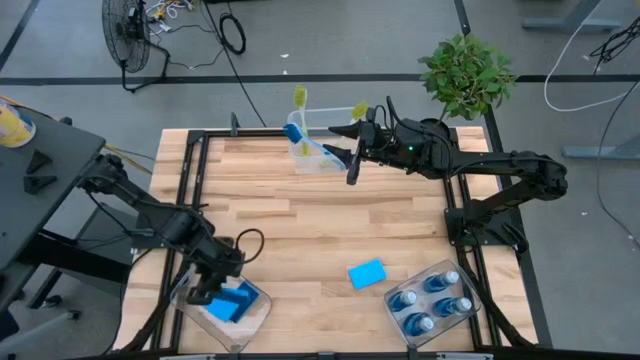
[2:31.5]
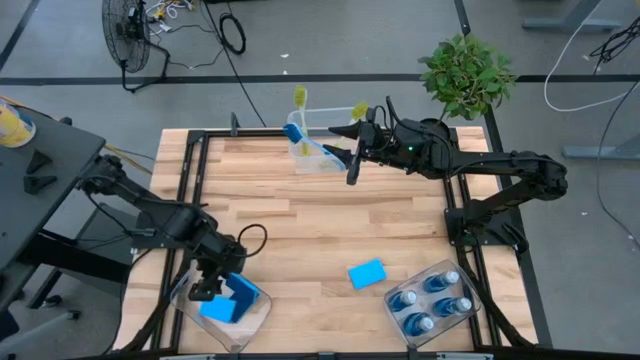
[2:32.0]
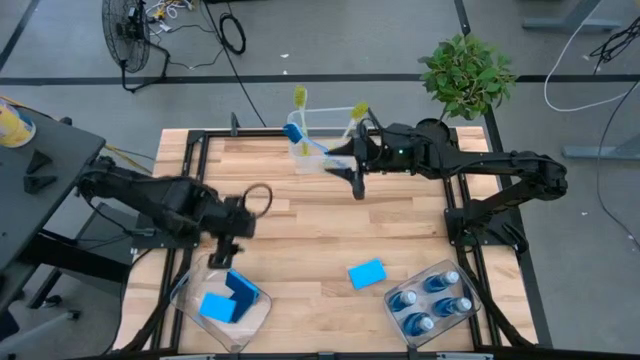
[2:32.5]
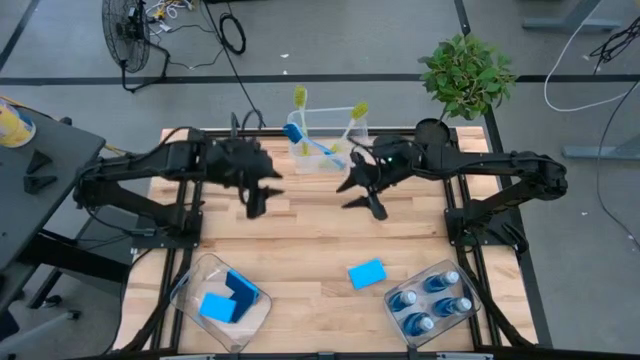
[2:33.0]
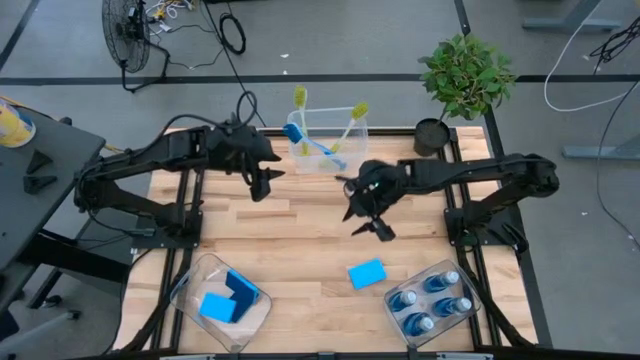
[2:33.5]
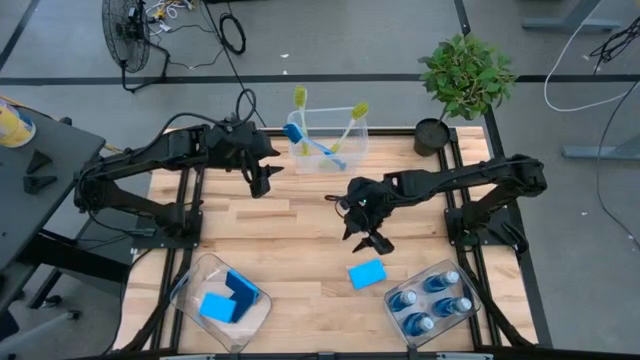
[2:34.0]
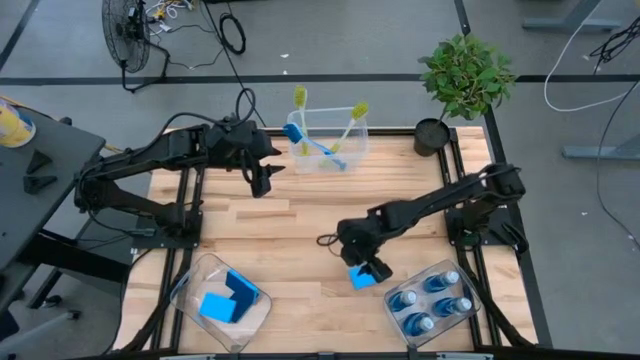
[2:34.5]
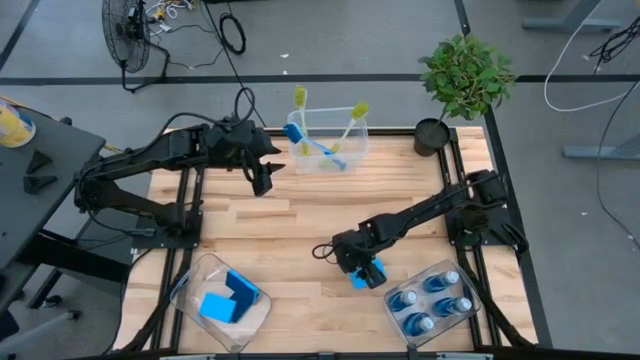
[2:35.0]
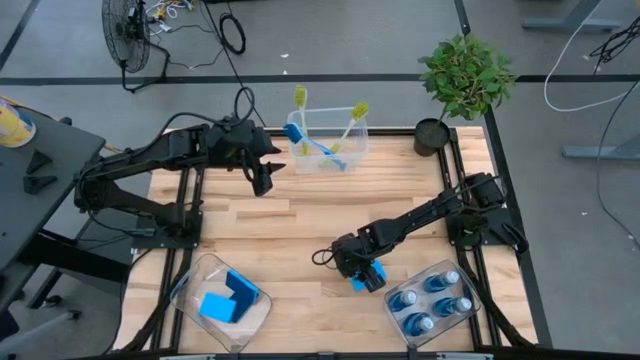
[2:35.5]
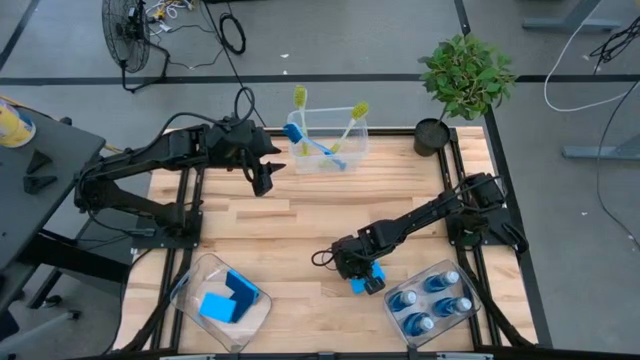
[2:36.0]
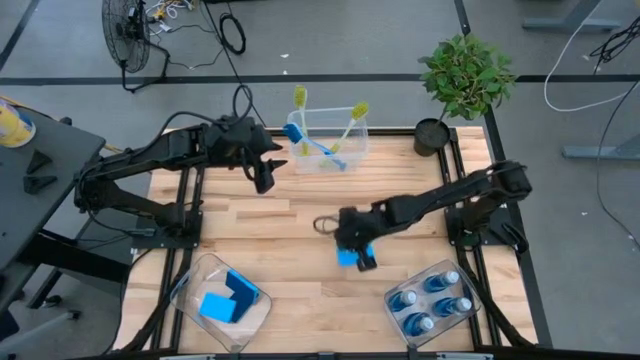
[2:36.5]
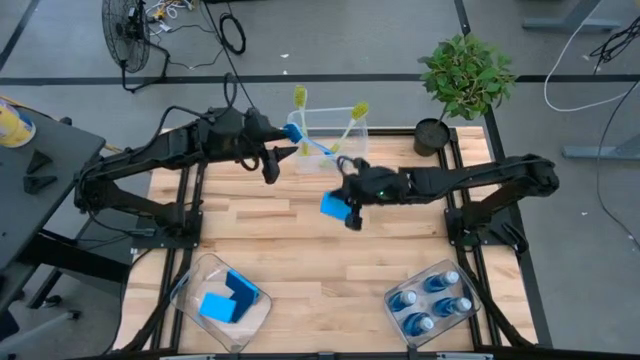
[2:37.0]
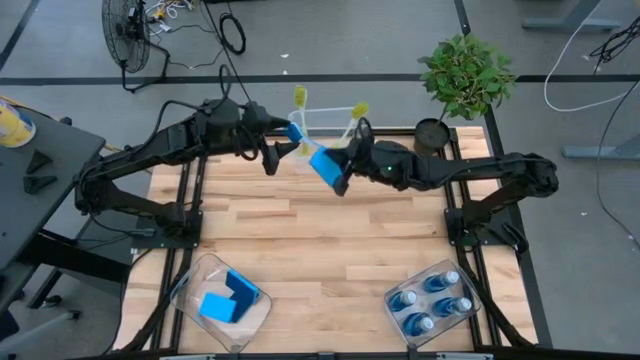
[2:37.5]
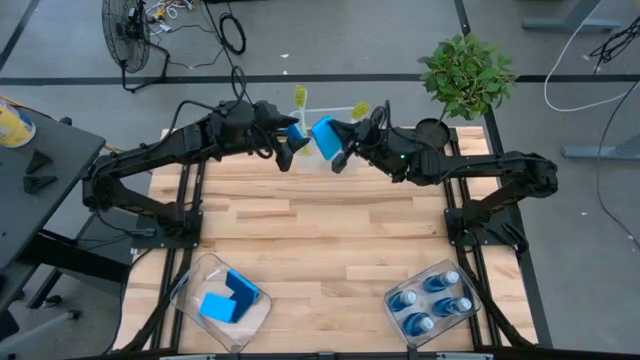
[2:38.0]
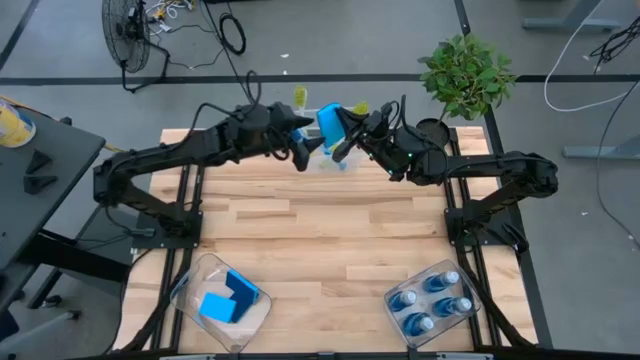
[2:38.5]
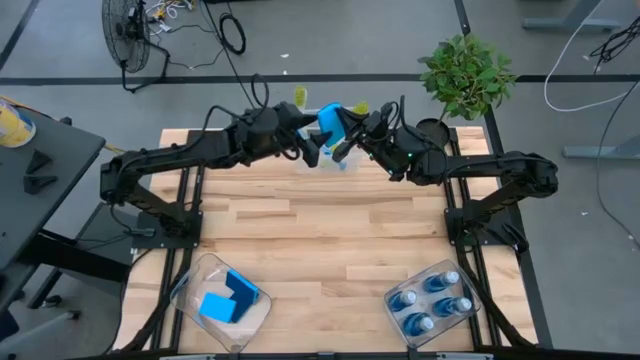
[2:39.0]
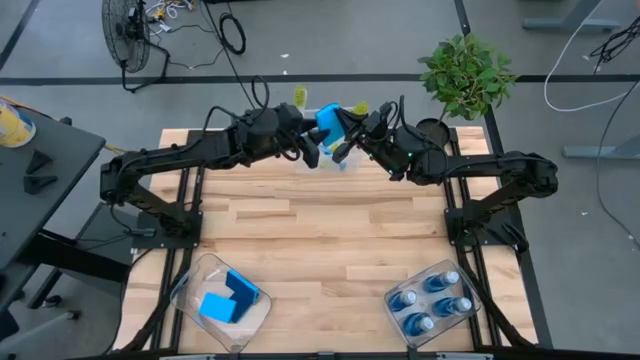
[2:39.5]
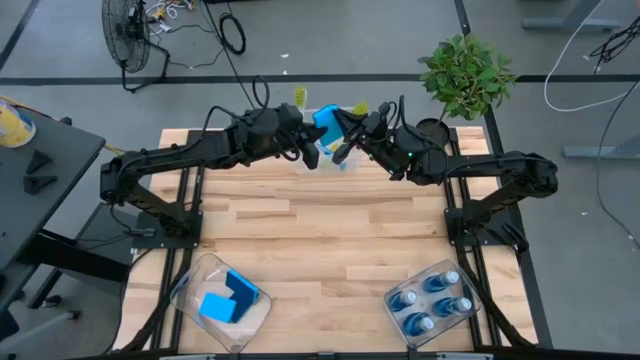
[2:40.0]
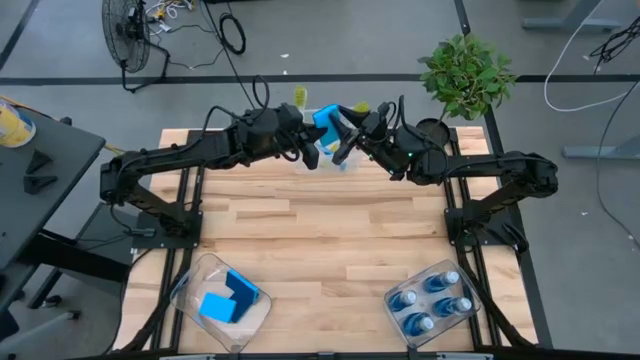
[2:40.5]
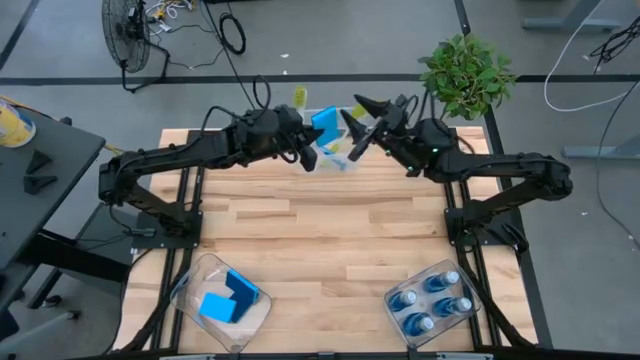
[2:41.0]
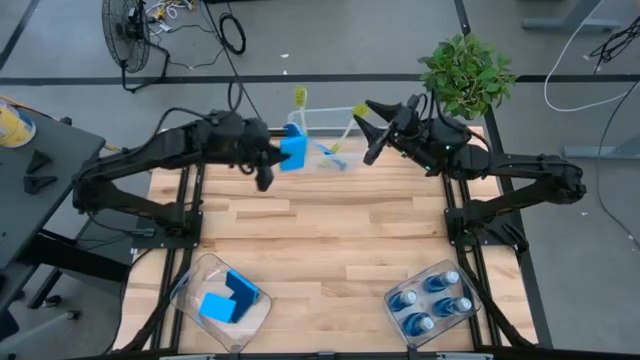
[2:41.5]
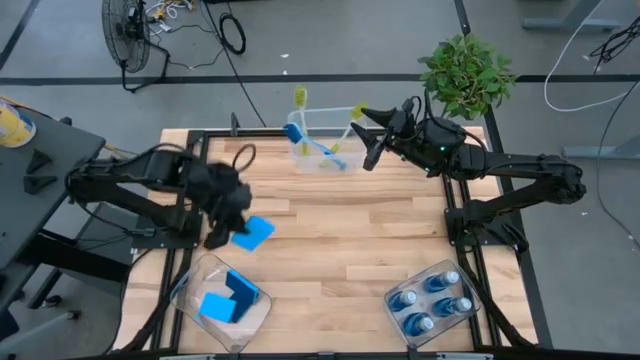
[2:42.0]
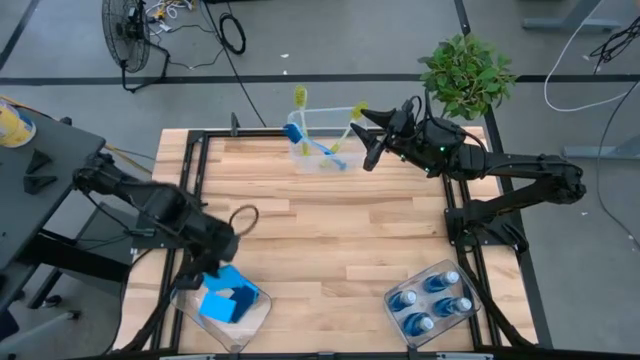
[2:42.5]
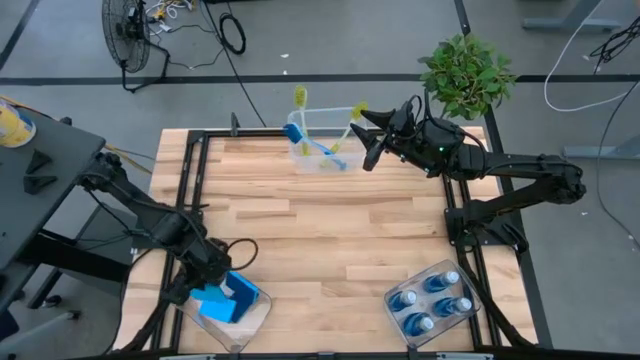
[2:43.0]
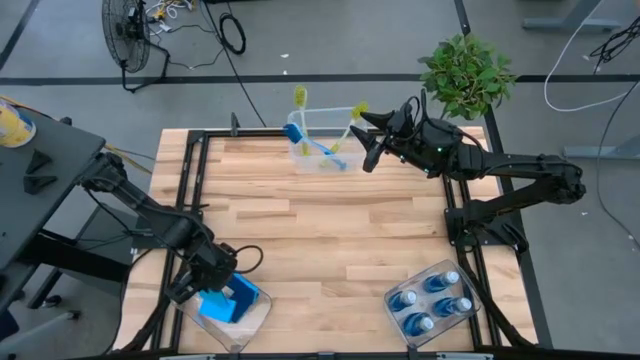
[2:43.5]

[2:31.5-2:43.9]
Task: Pick & Place Kitchen Sink Supplies
Put the blue sponge into the bottom left transparent bin

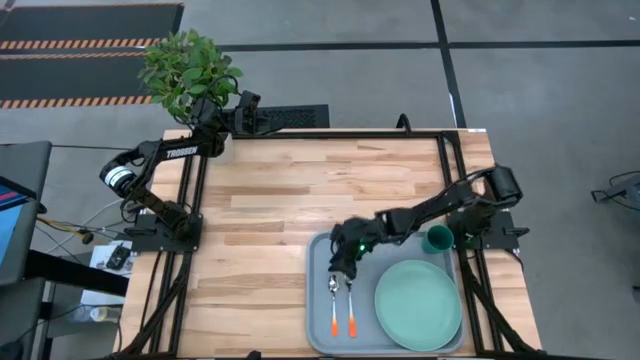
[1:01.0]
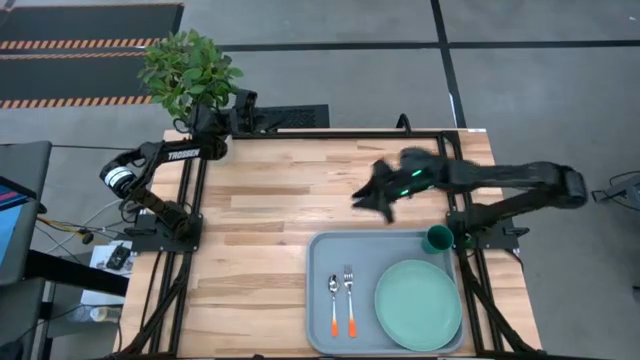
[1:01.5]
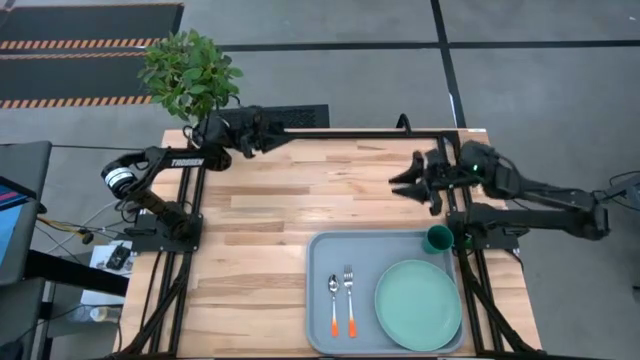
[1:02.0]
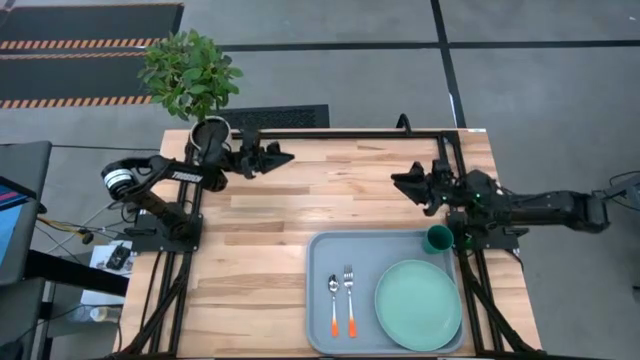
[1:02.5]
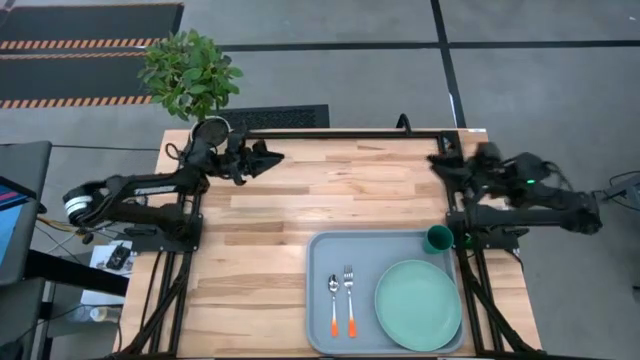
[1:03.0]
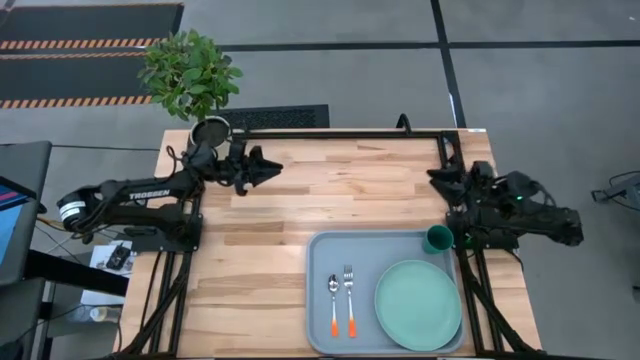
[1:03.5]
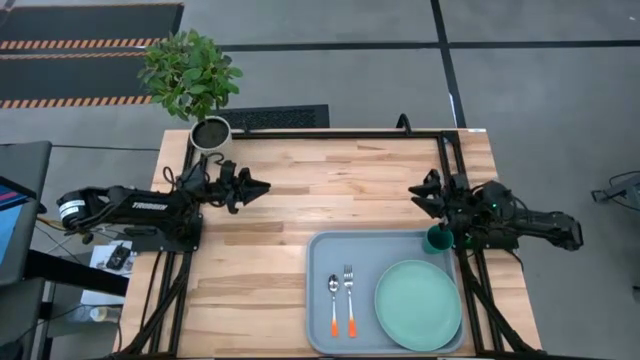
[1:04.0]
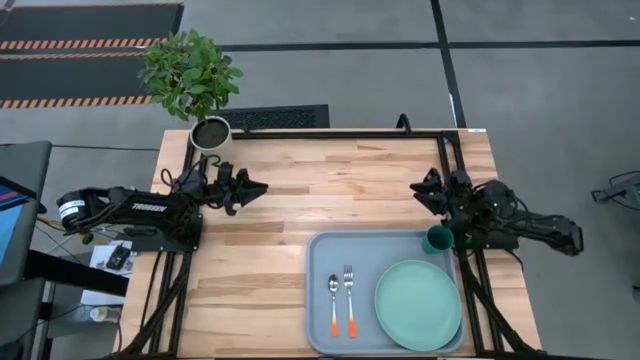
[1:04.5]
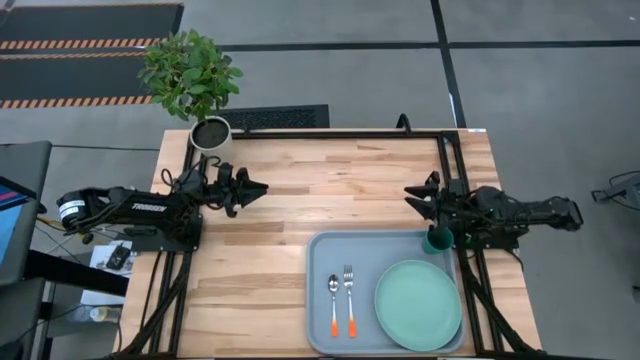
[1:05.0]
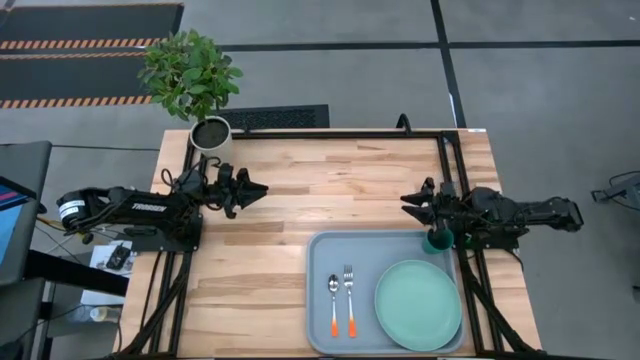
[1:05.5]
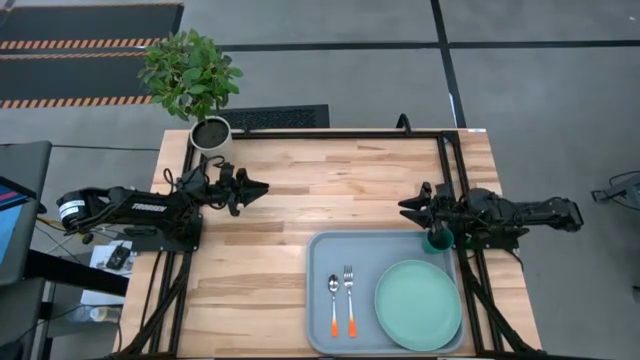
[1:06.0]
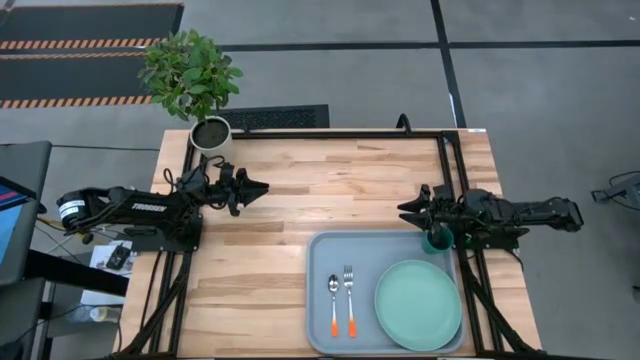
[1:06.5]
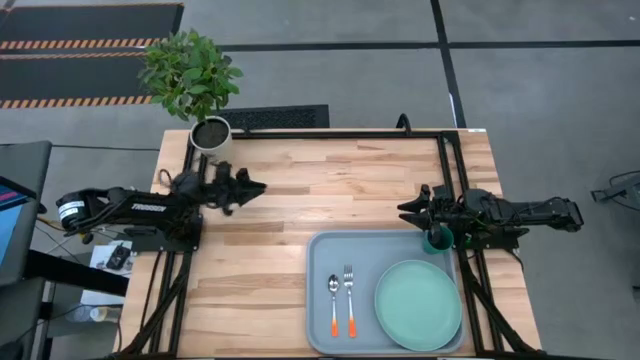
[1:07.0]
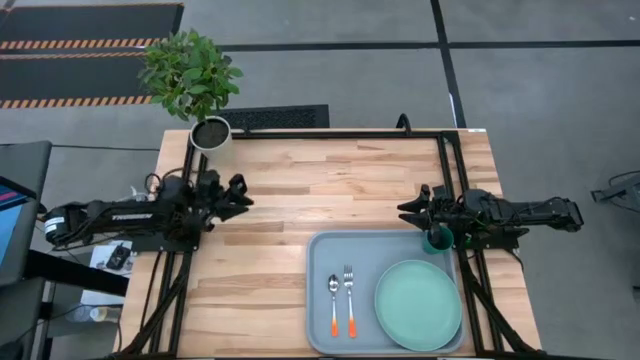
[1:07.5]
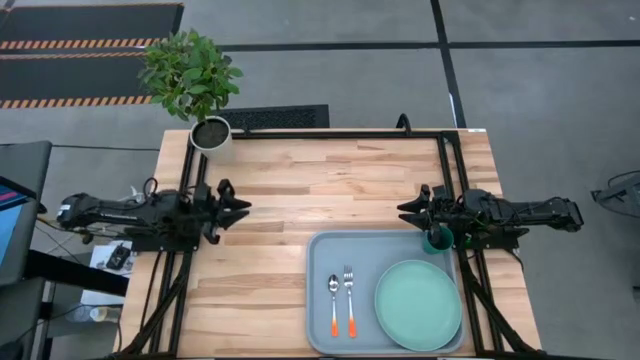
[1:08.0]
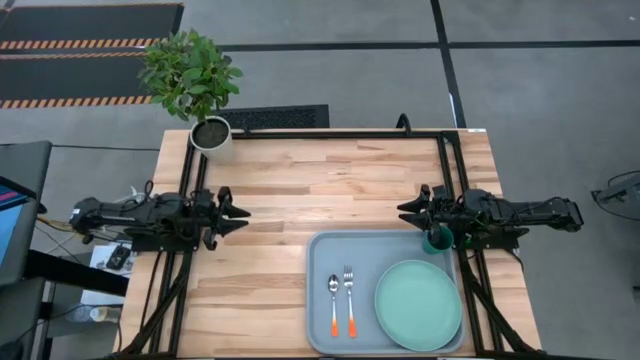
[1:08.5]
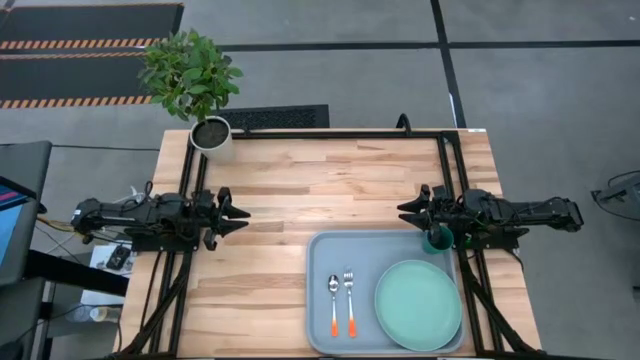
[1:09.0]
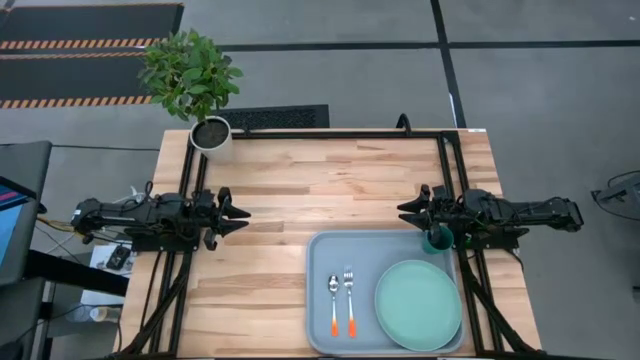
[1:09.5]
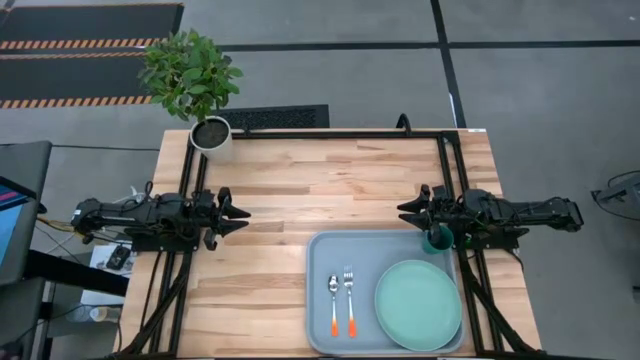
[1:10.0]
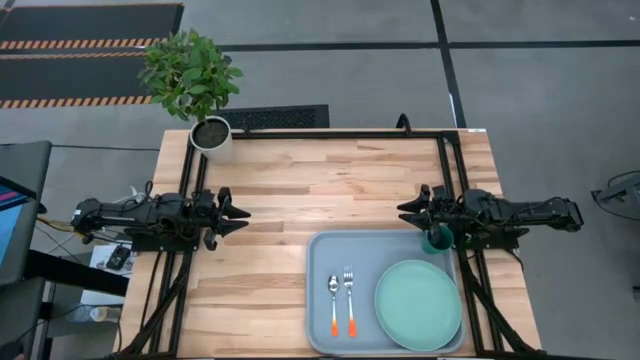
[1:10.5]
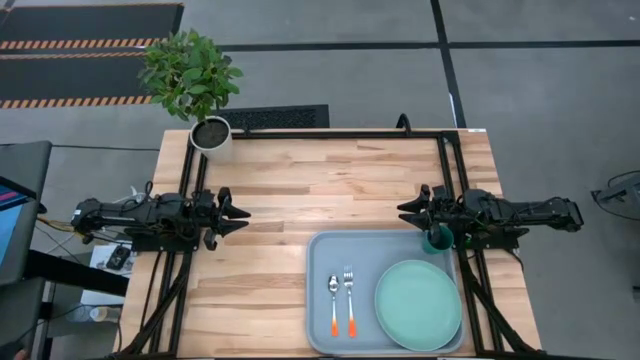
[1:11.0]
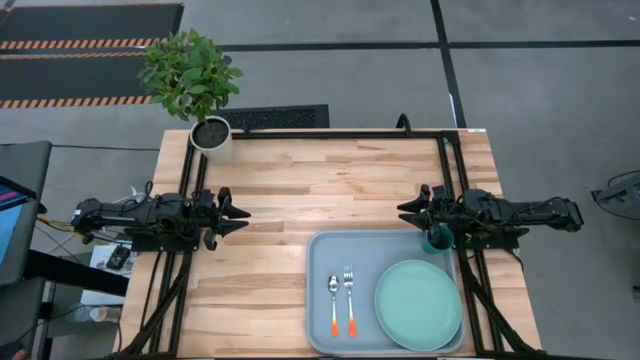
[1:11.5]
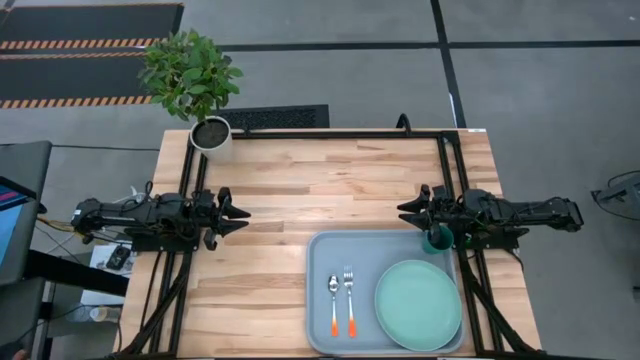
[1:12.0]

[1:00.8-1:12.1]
Task: Pick and place plate/cup/fork/spoon on tray
Return to Home Position
